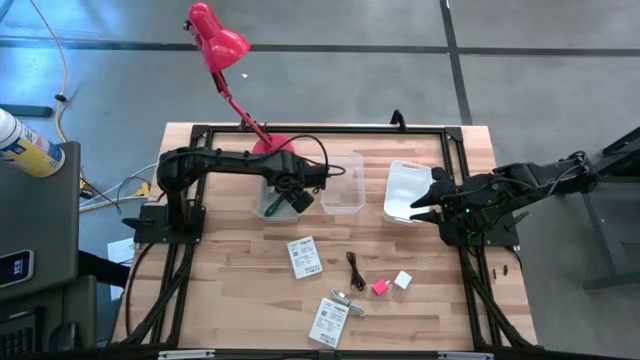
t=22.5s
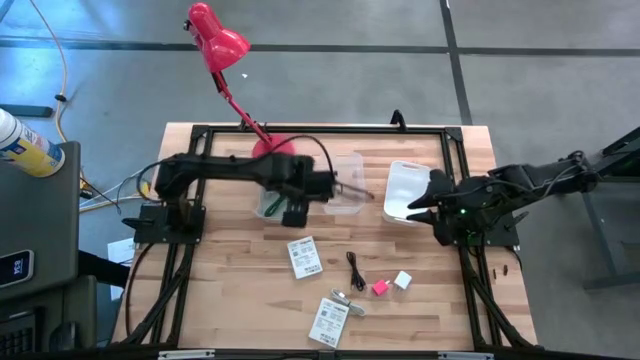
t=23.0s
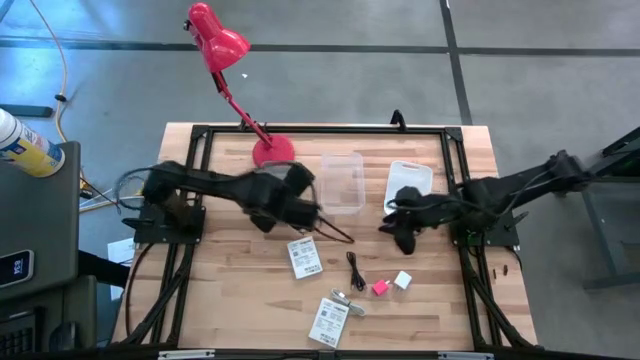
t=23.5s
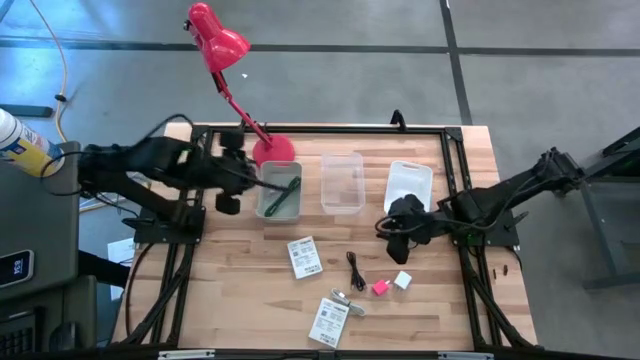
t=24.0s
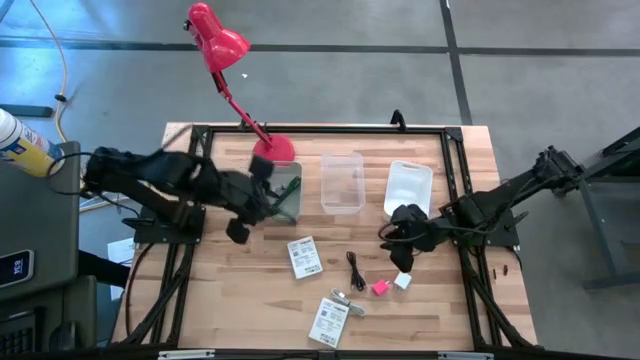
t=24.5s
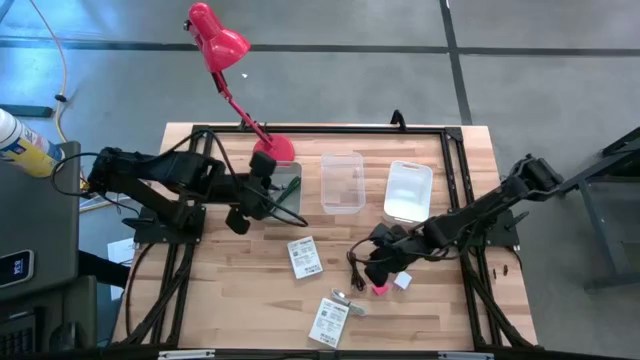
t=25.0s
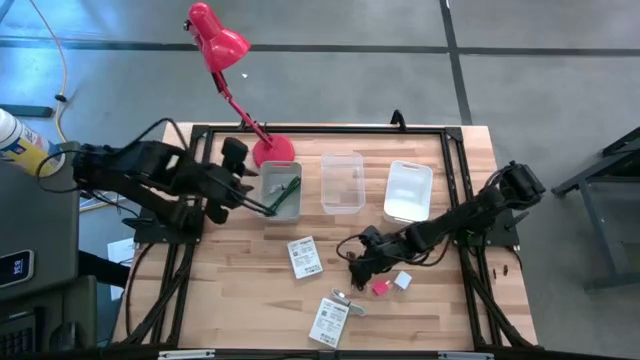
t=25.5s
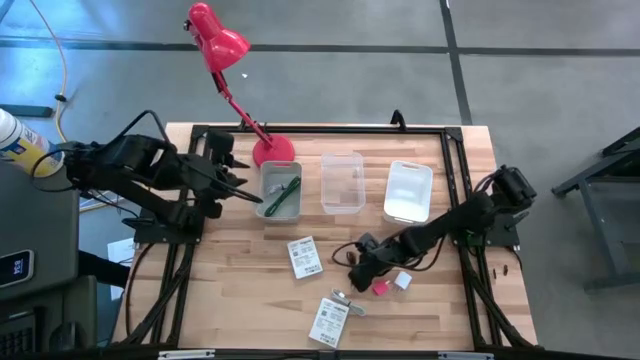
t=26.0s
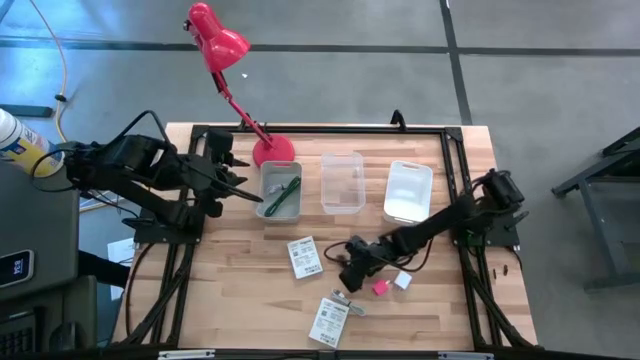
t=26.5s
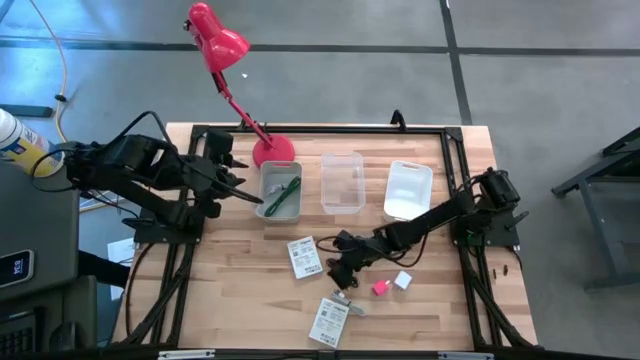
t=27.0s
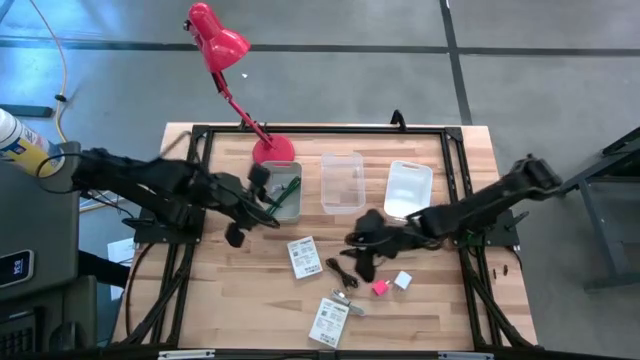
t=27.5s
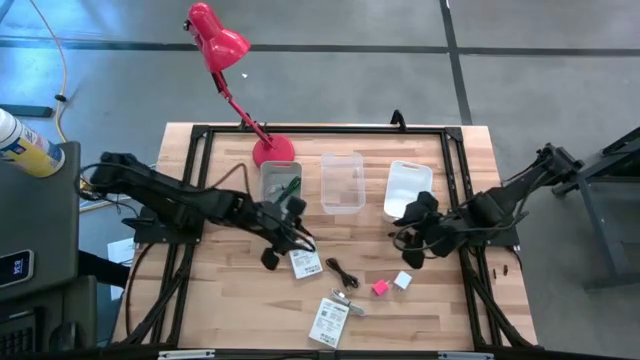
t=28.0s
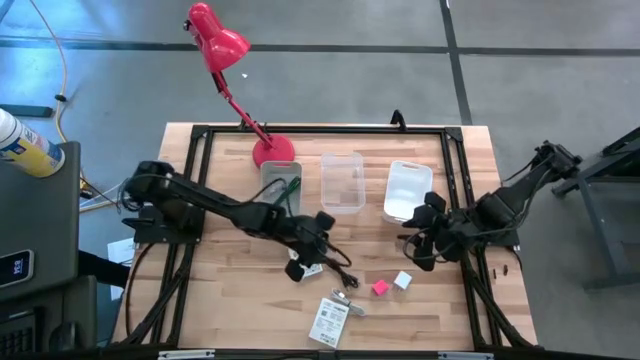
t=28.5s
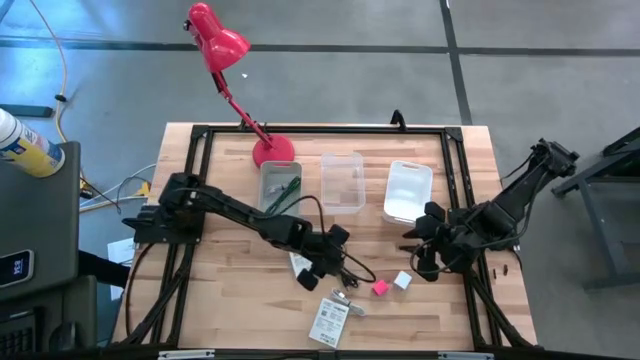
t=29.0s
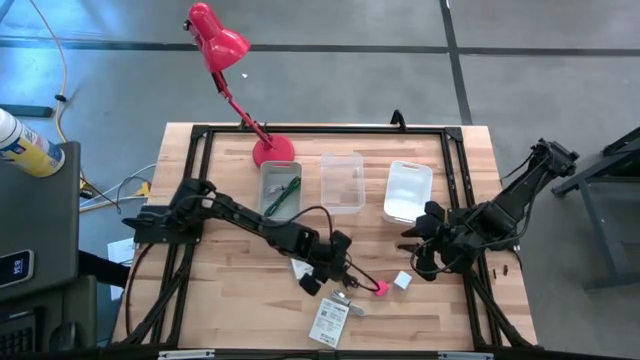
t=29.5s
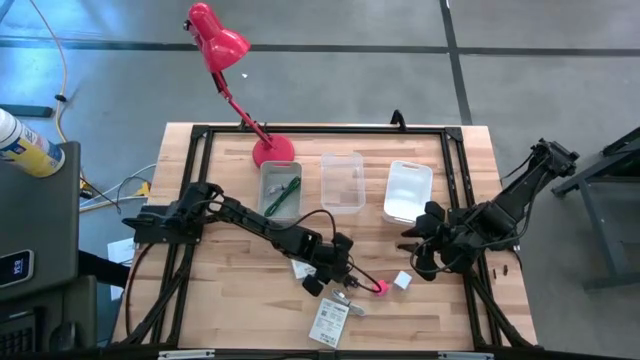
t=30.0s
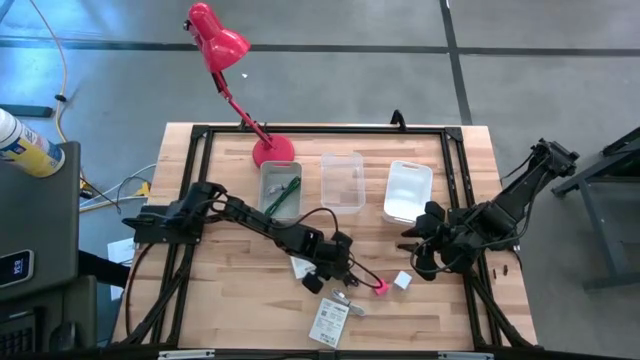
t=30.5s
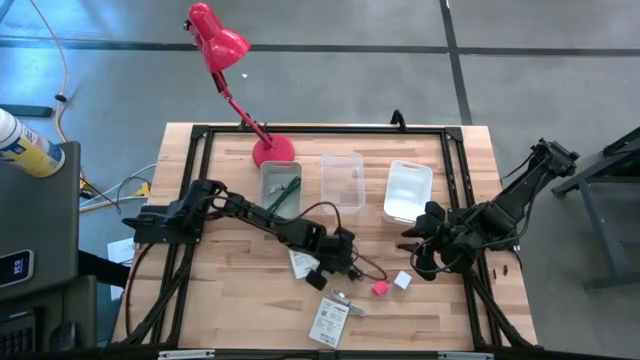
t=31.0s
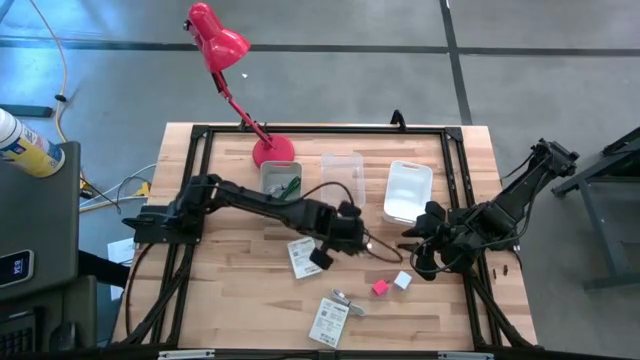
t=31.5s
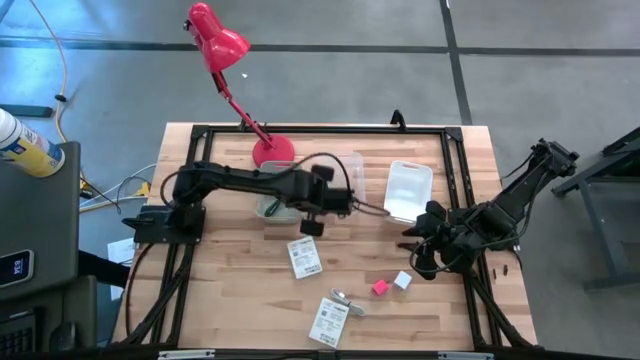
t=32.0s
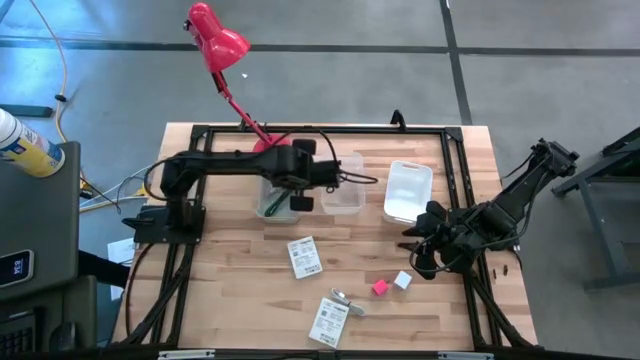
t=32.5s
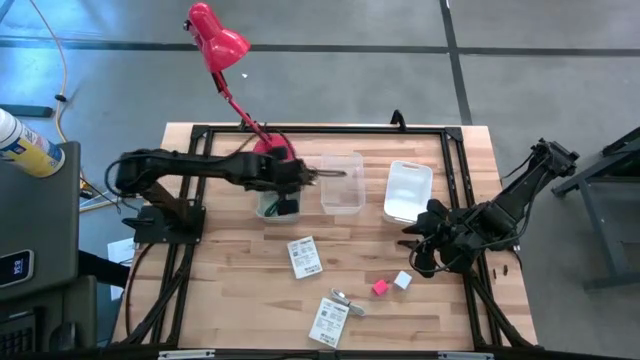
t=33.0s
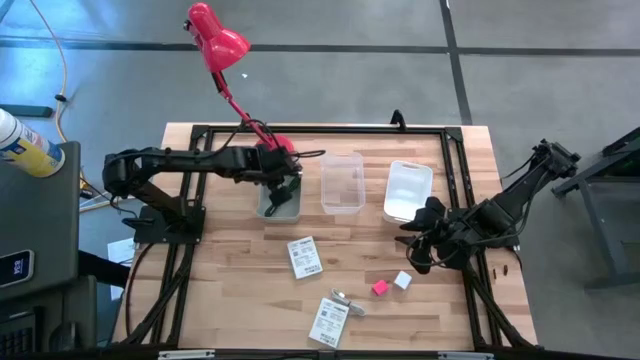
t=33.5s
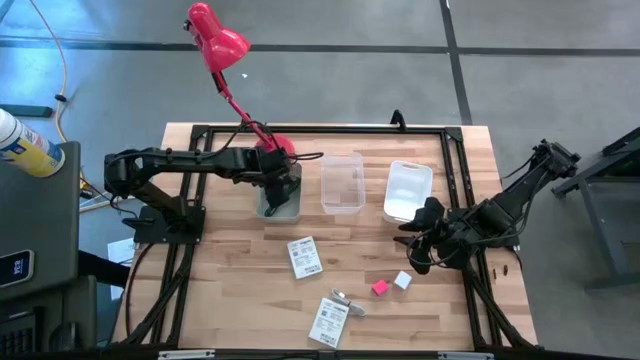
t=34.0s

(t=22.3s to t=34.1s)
Task: Pick and place items into bin
Put the black charger cable into the gray bin

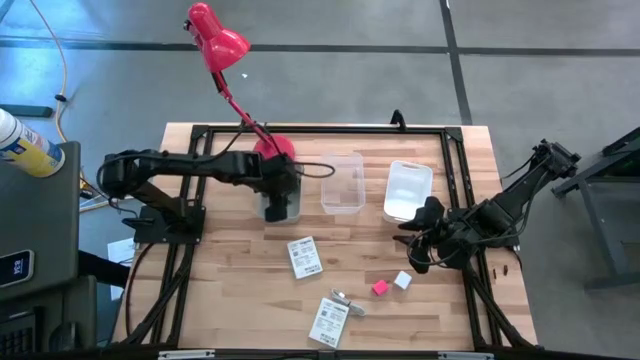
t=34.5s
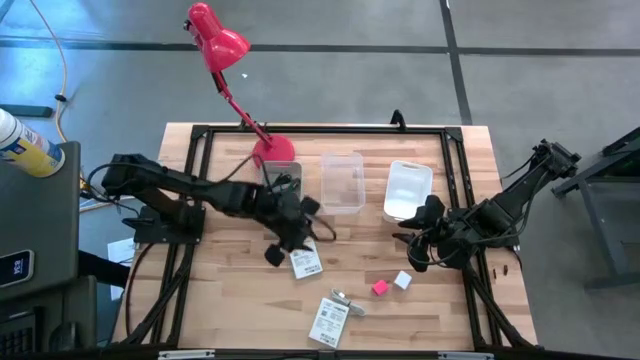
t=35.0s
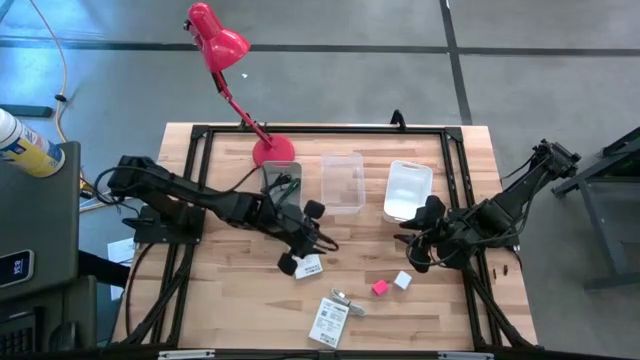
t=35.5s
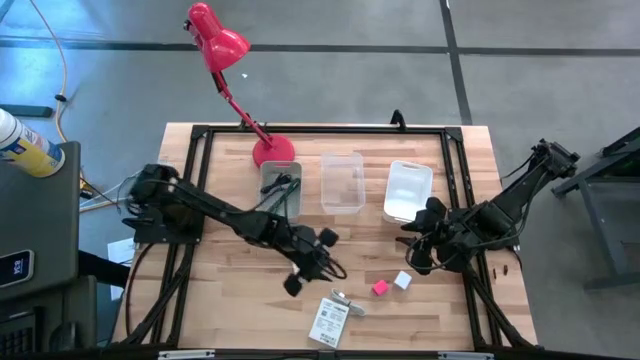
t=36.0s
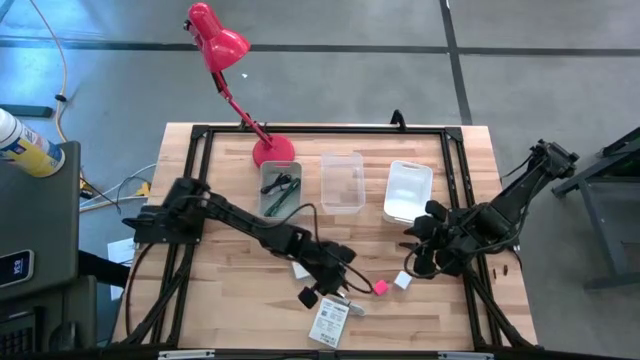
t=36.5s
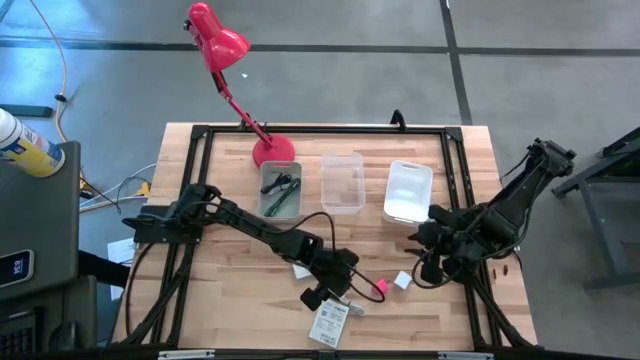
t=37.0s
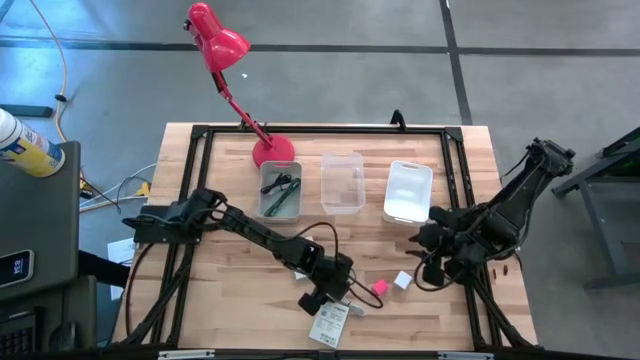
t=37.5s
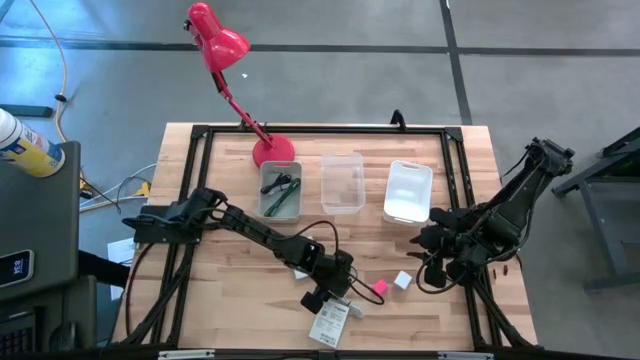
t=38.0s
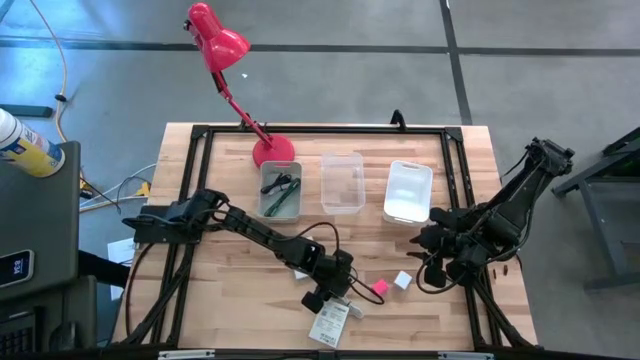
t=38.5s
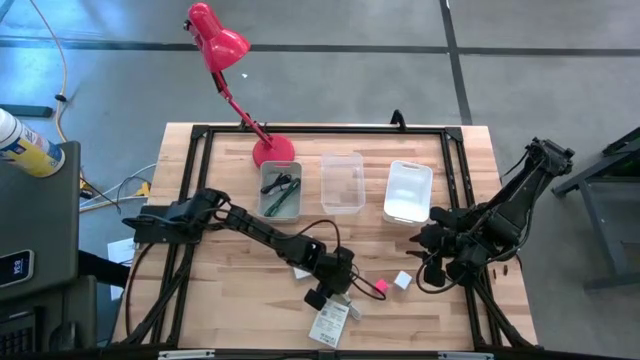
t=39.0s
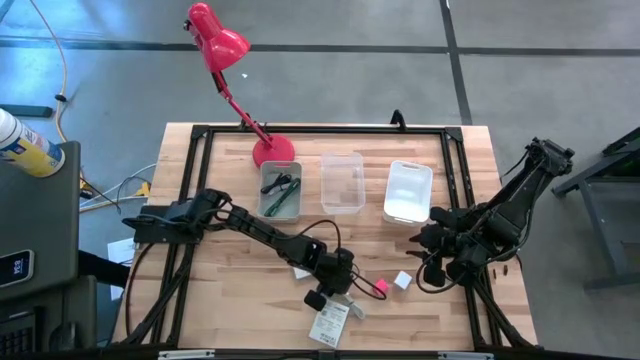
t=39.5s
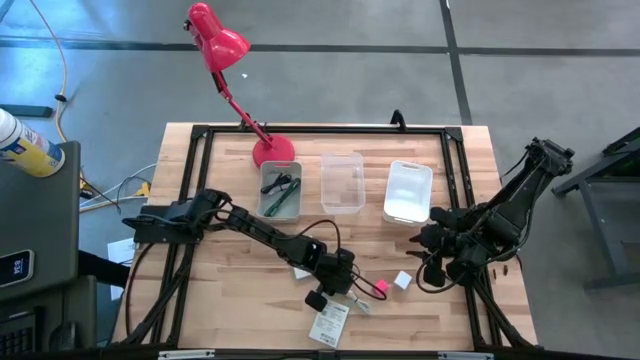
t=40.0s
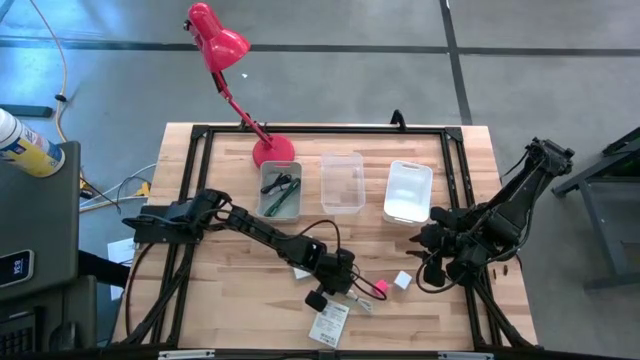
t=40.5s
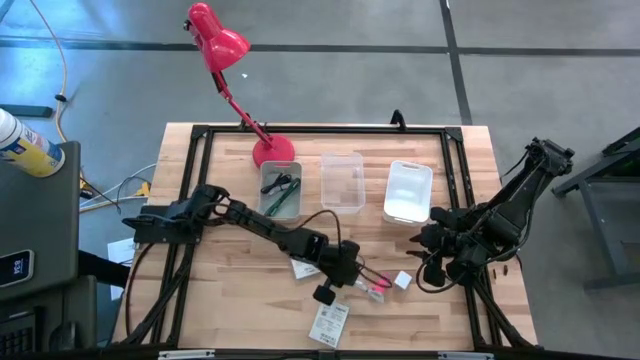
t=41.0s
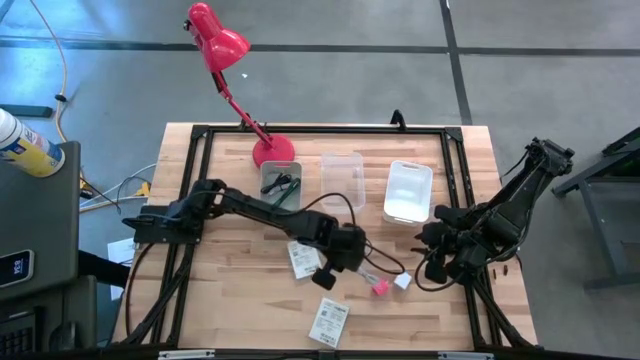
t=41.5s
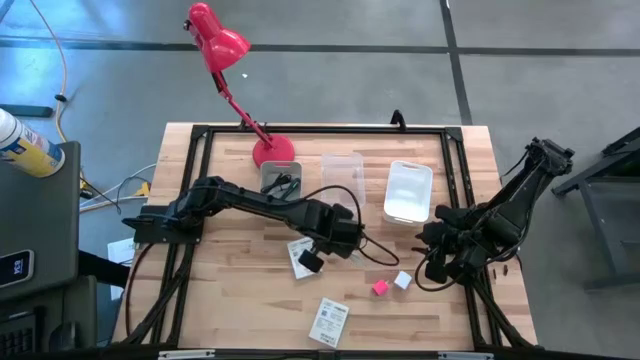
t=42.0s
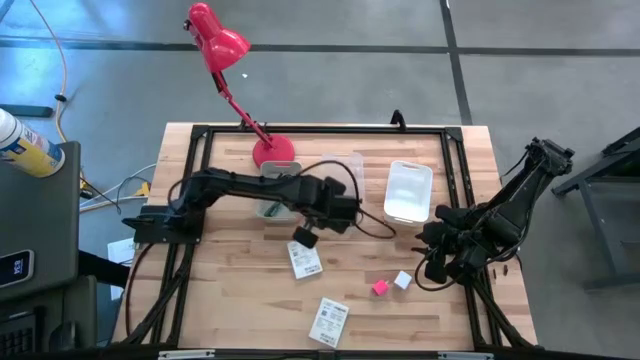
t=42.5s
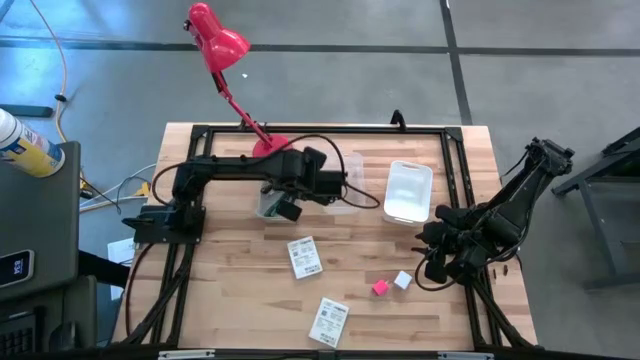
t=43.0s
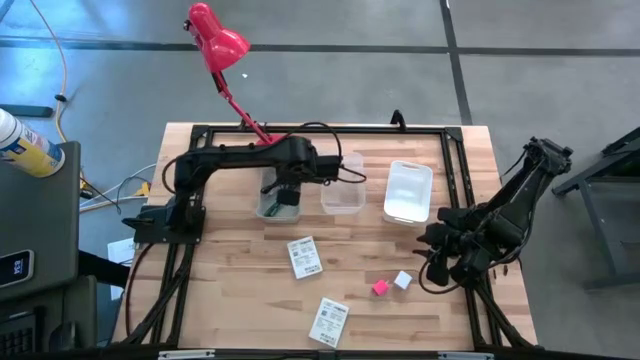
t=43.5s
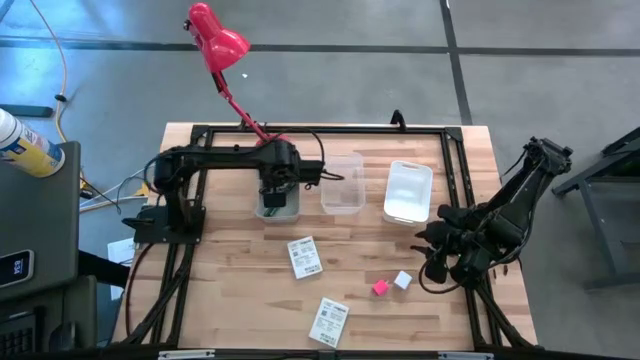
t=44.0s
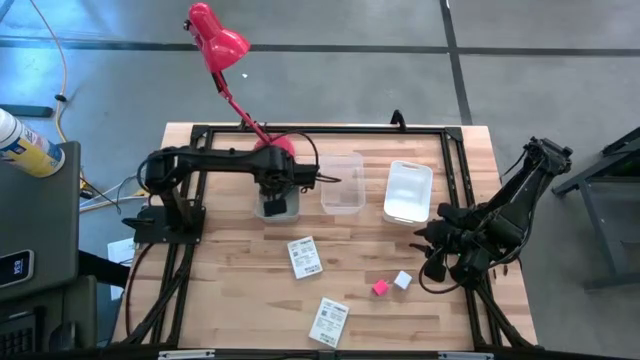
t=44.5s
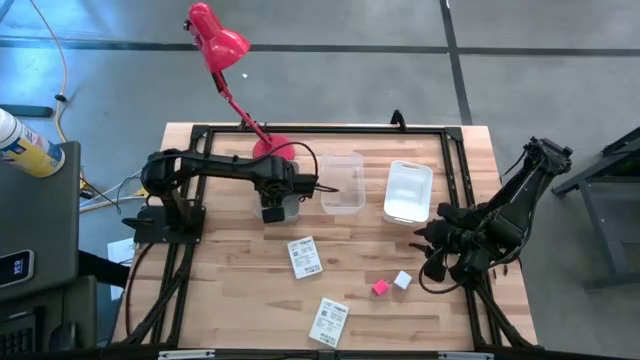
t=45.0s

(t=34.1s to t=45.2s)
Put the white charger cable into the gray bin
